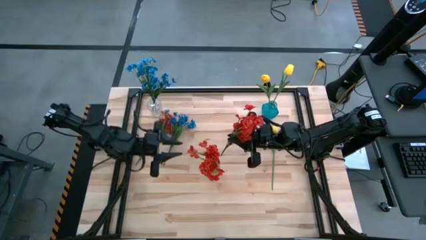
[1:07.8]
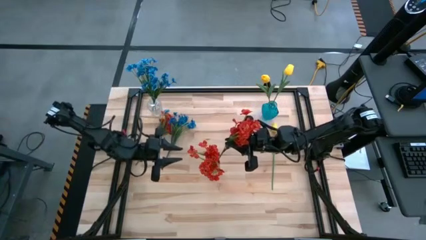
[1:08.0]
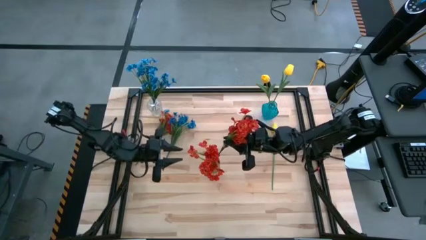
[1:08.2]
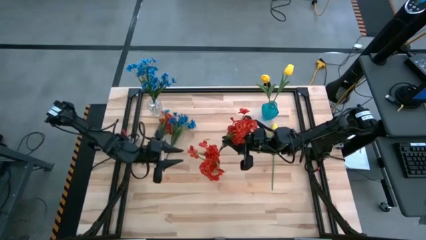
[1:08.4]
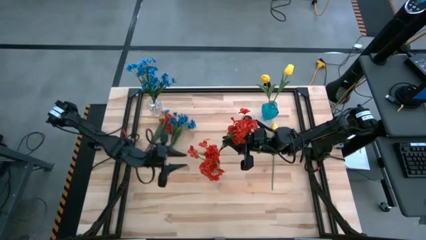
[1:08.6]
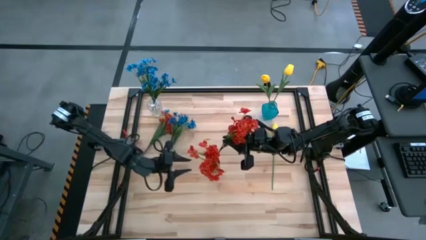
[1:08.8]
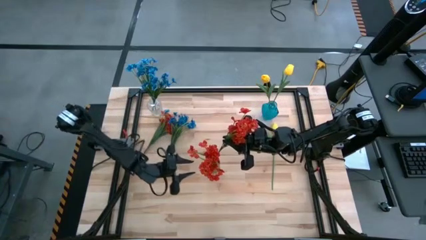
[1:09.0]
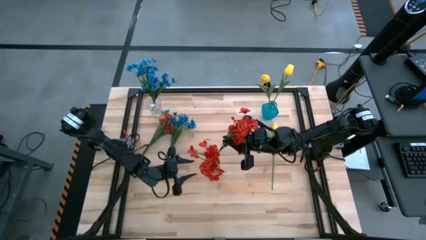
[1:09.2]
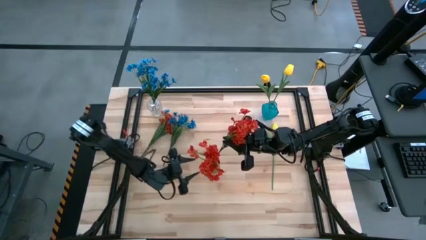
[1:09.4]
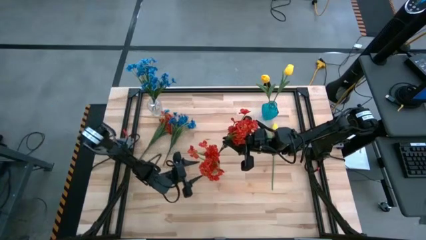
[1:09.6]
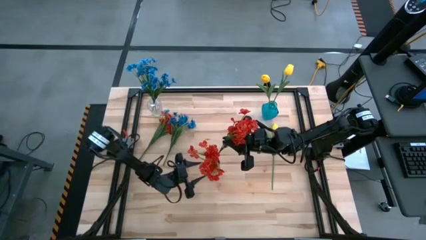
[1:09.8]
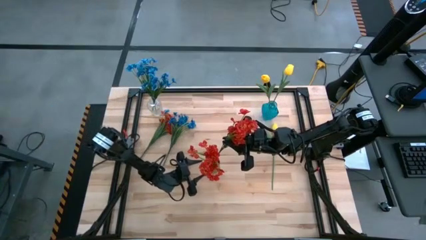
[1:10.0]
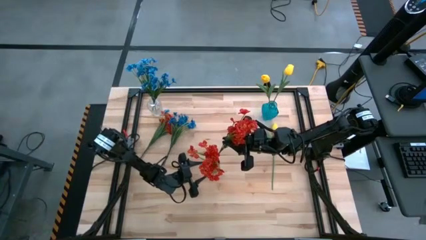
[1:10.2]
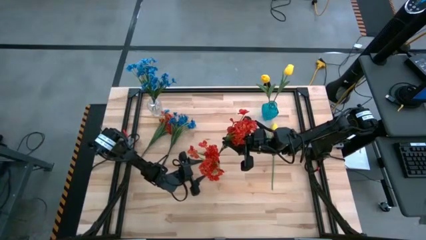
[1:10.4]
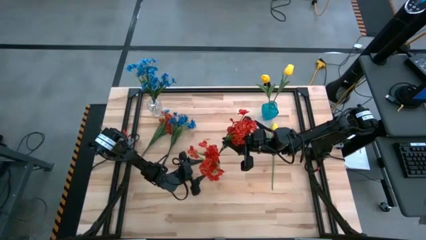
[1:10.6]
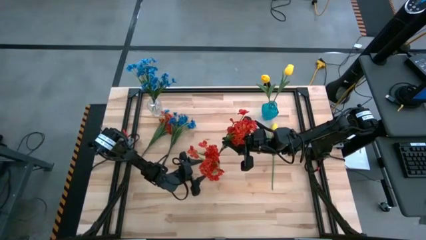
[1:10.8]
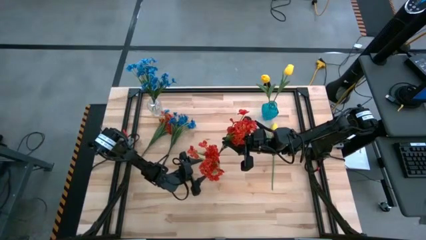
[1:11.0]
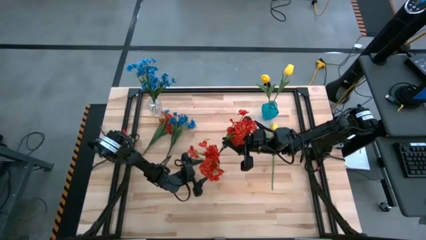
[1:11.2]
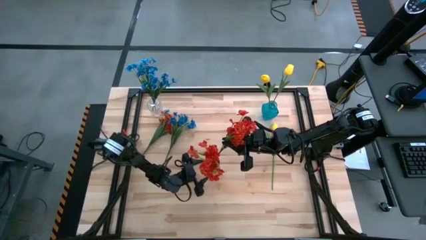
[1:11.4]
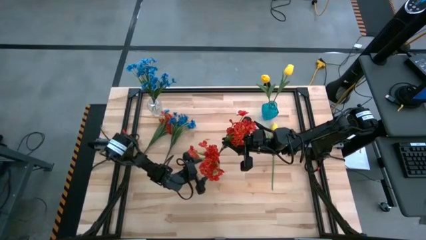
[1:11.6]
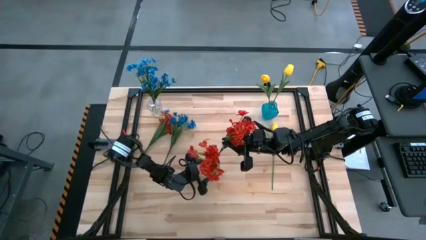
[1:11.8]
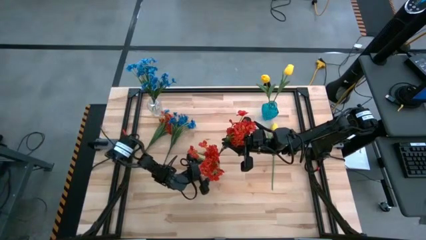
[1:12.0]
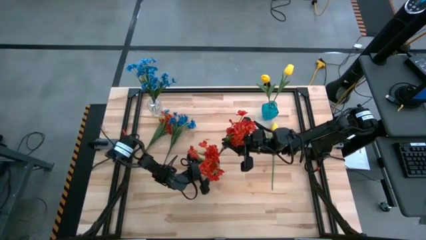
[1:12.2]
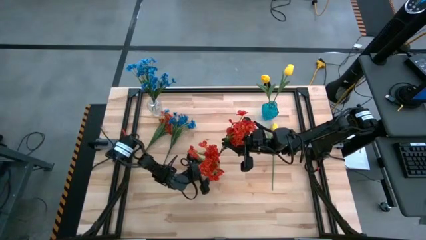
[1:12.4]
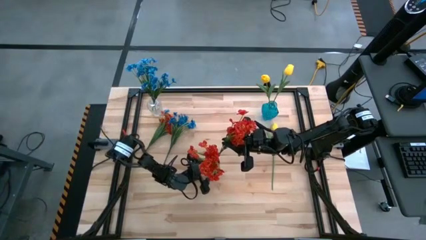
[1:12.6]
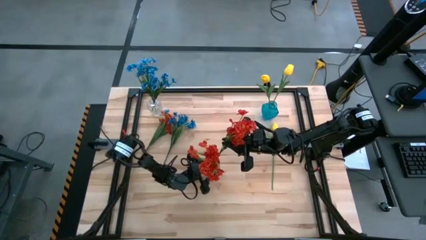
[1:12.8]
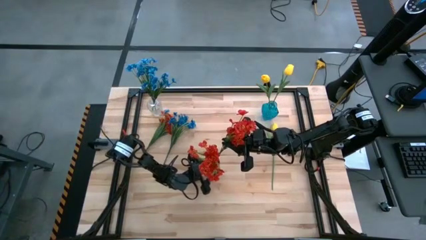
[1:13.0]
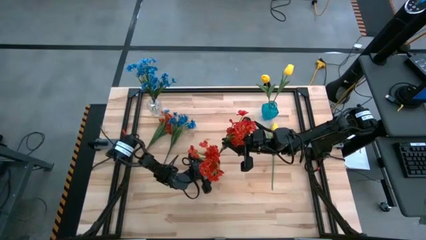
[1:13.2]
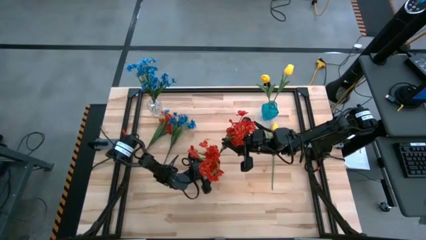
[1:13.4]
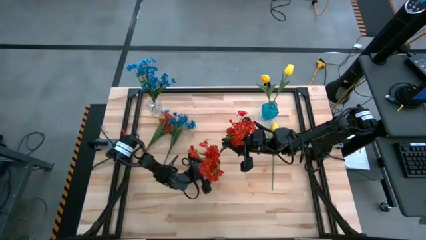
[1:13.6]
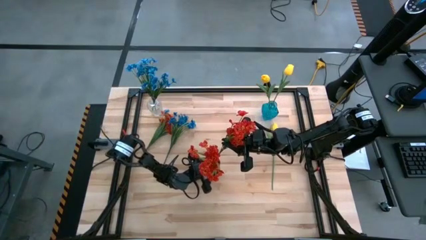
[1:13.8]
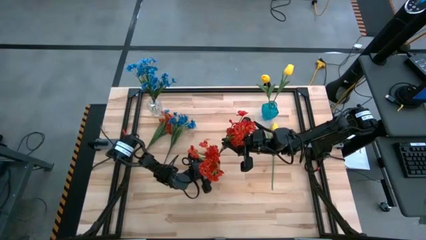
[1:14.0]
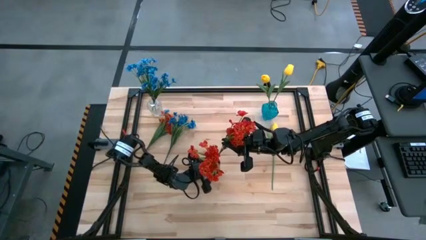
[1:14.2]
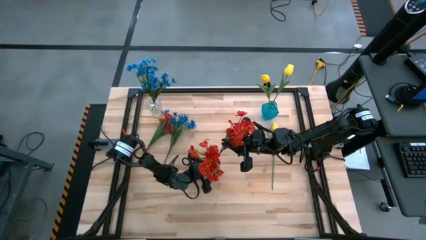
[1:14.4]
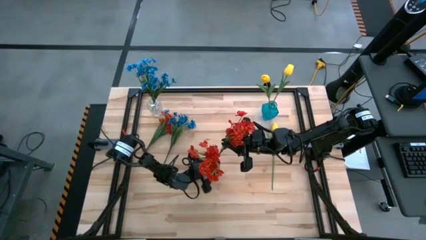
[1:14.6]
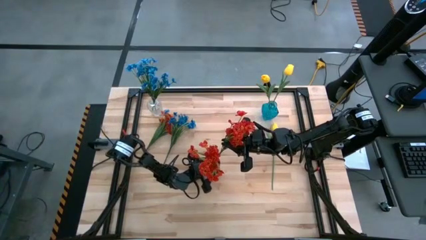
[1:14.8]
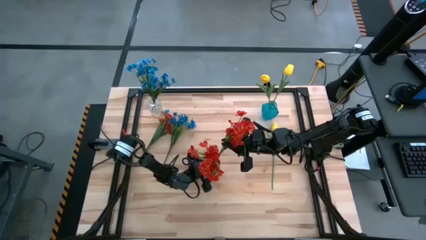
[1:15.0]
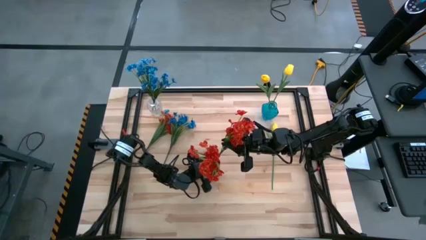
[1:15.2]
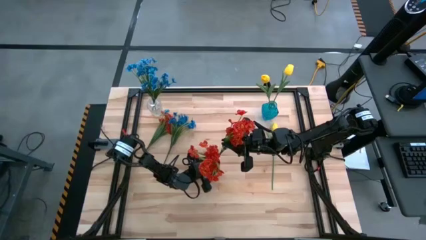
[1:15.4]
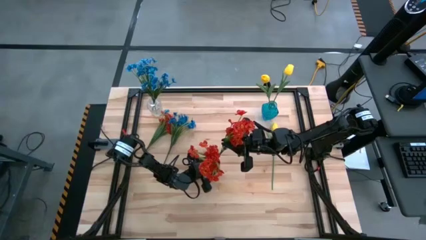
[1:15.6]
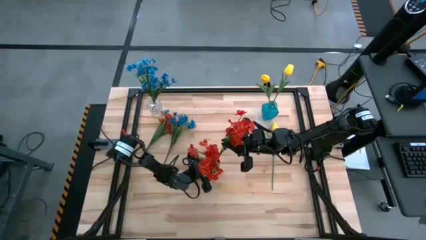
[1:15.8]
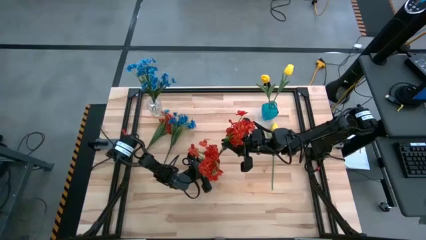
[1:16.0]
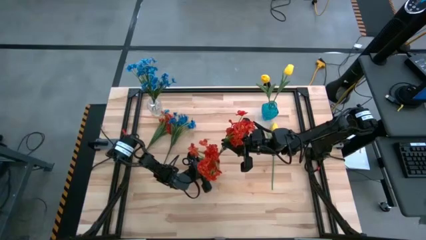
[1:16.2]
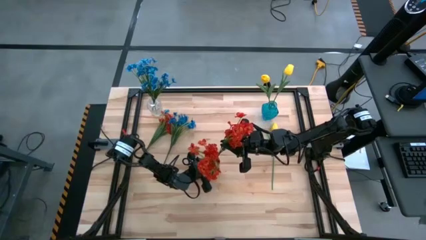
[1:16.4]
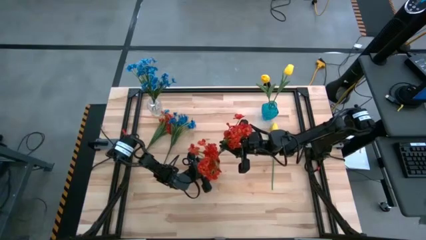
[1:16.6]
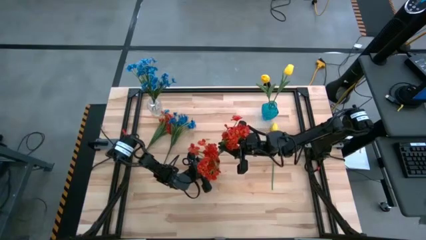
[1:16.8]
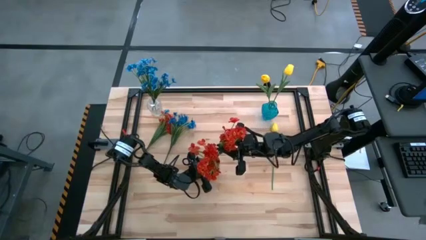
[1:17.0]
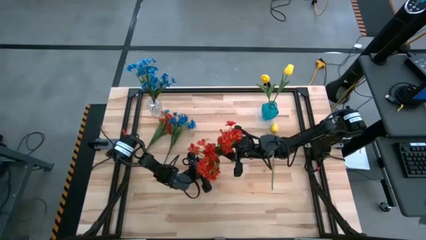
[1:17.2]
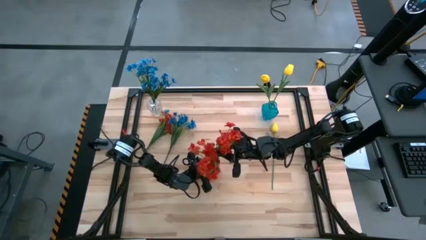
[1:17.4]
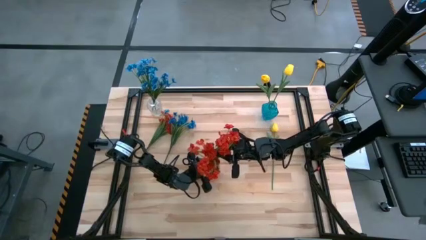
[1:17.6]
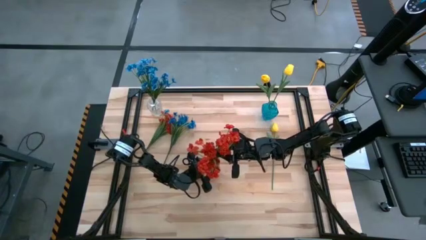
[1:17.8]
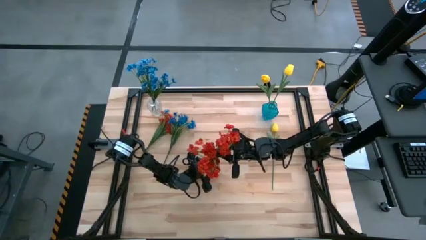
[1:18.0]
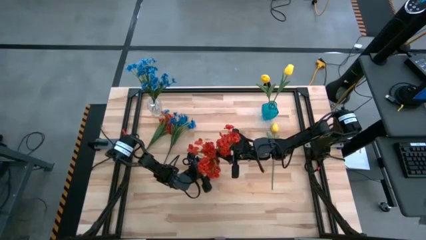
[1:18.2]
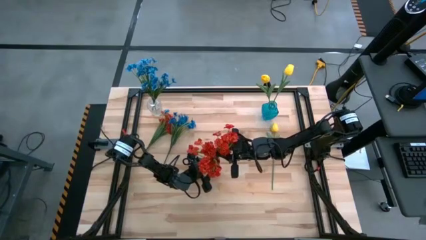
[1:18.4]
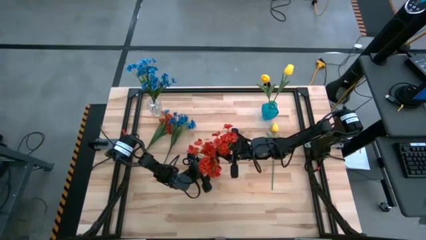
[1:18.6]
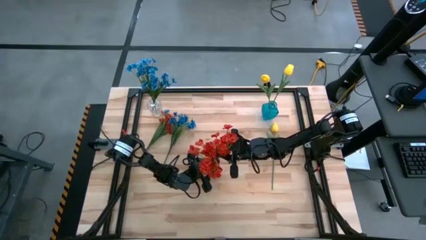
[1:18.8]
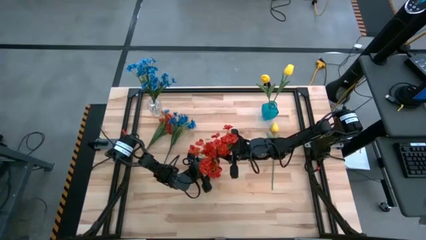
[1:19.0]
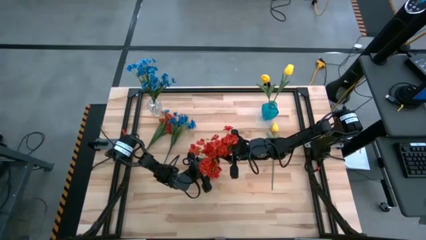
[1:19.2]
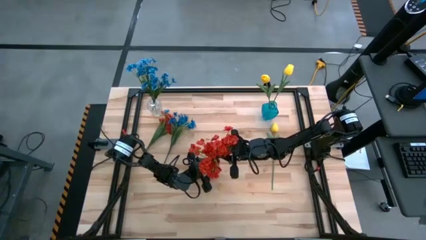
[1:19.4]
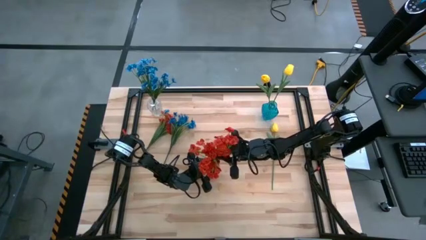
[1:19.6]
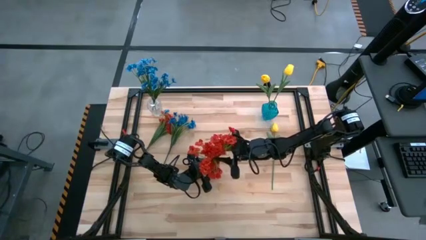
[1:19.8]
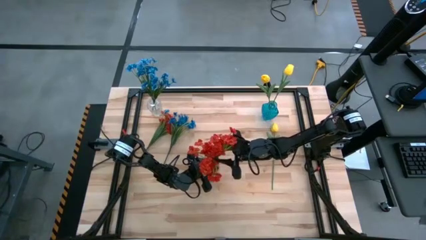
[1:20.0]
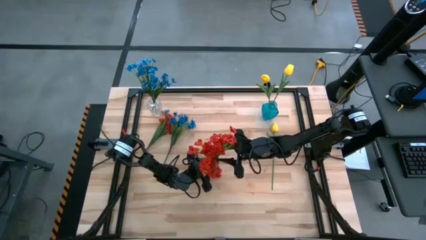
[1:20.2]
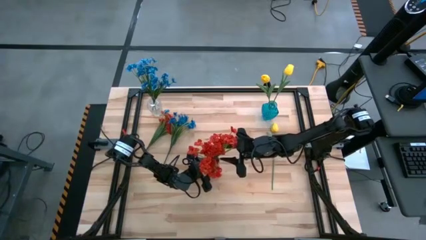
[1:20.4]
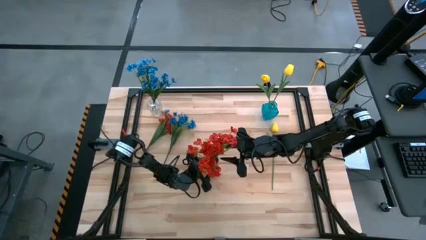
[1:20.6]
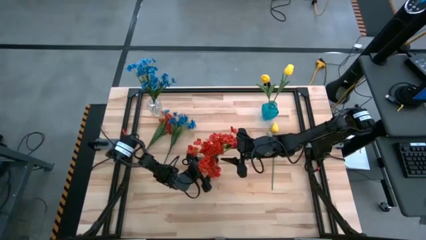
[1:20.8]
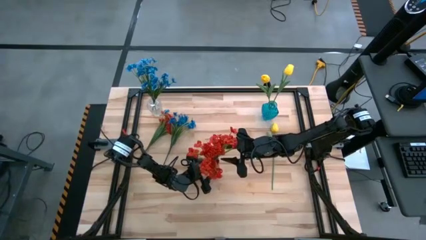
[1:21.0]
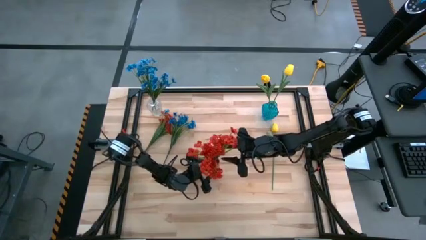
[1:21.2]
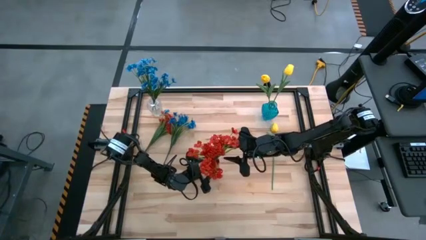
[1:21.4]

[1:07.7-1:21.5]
Task: Sort flowers into vase by color
Put the right red flowers into the red vase
